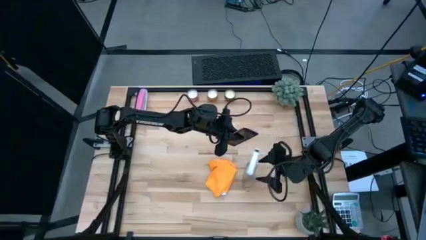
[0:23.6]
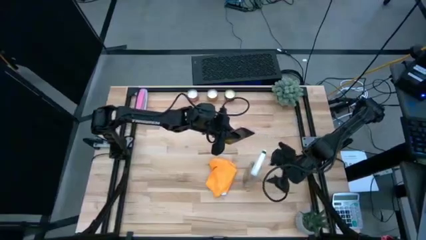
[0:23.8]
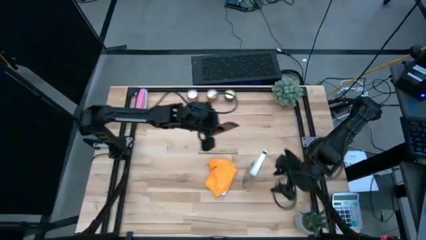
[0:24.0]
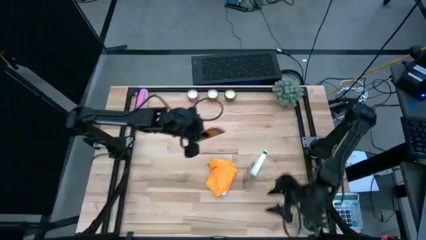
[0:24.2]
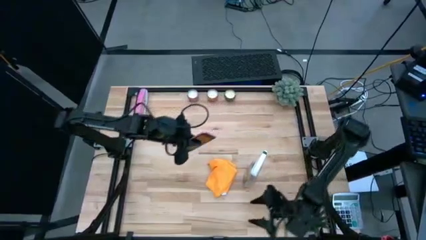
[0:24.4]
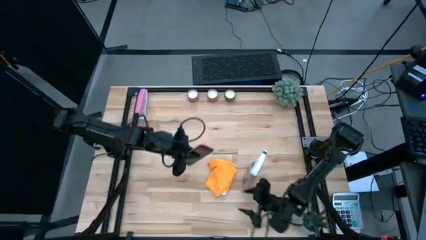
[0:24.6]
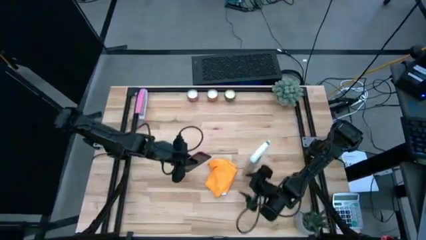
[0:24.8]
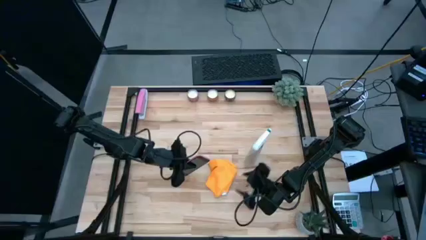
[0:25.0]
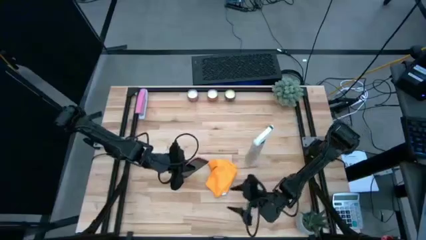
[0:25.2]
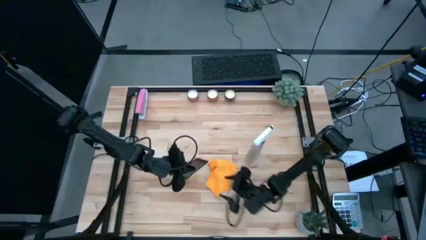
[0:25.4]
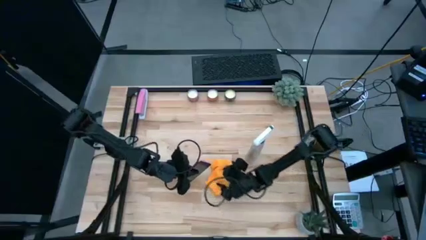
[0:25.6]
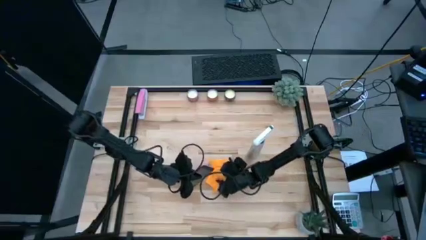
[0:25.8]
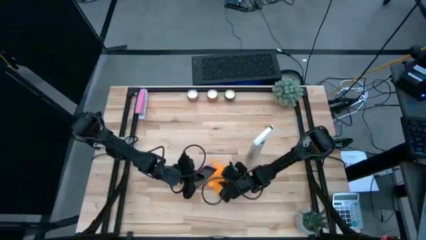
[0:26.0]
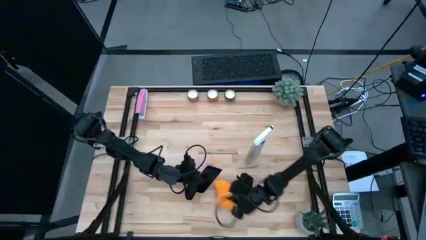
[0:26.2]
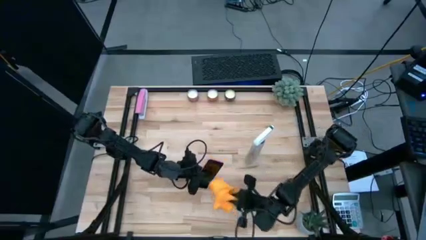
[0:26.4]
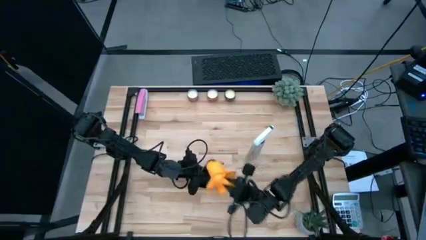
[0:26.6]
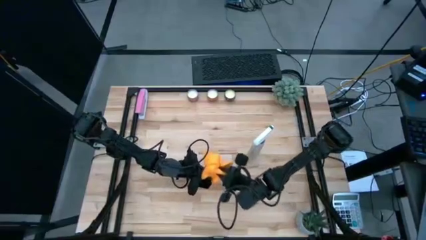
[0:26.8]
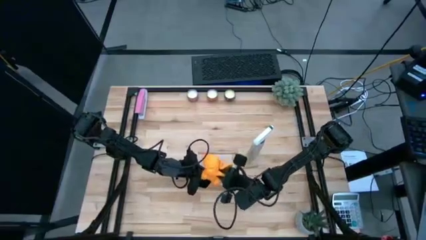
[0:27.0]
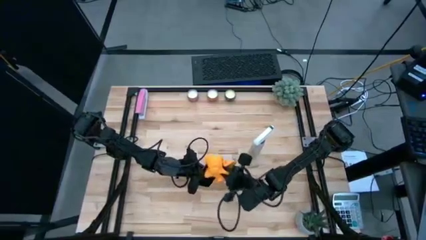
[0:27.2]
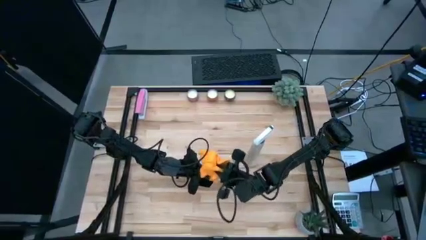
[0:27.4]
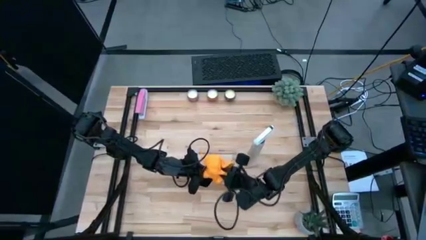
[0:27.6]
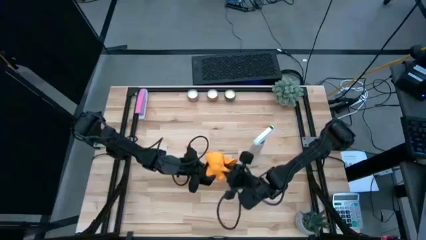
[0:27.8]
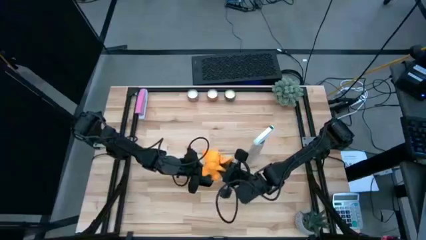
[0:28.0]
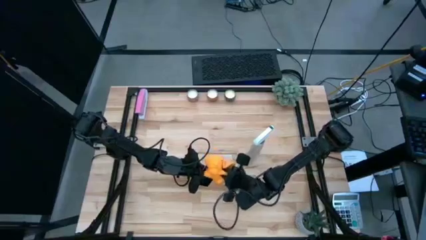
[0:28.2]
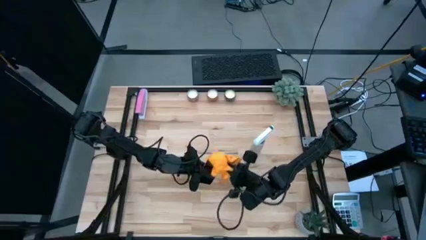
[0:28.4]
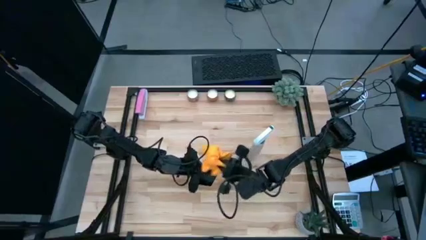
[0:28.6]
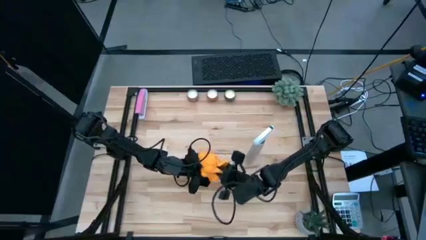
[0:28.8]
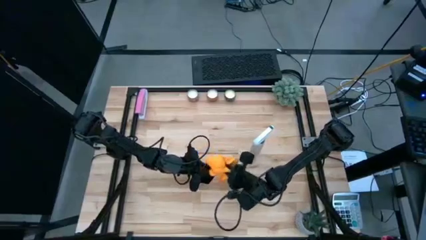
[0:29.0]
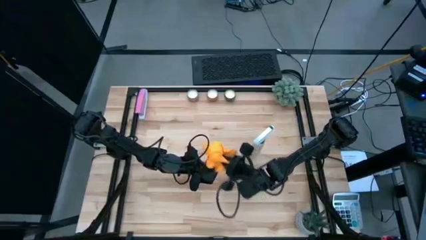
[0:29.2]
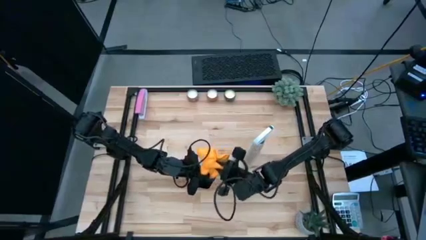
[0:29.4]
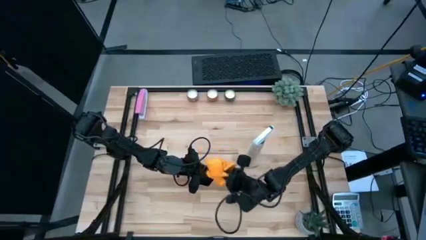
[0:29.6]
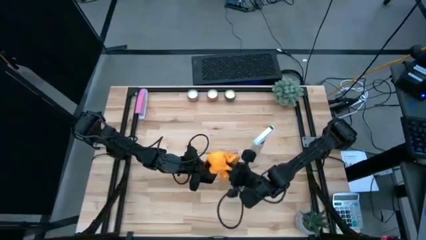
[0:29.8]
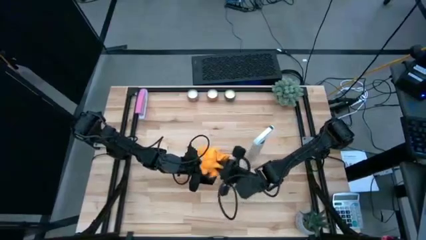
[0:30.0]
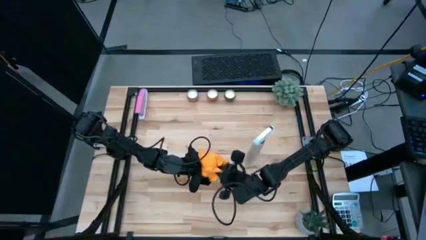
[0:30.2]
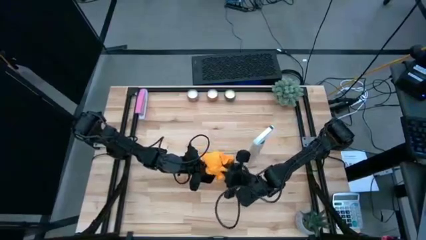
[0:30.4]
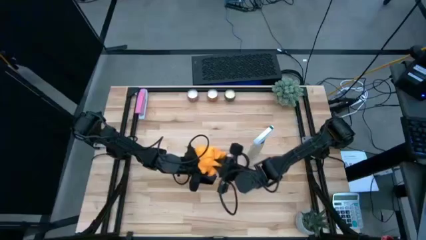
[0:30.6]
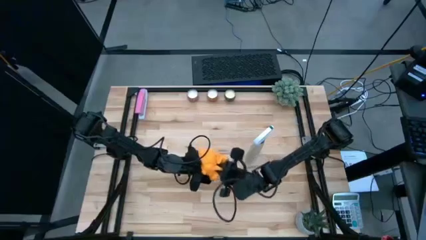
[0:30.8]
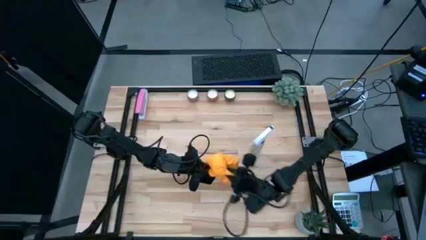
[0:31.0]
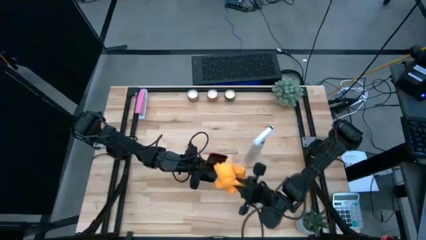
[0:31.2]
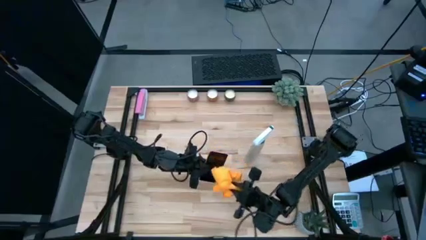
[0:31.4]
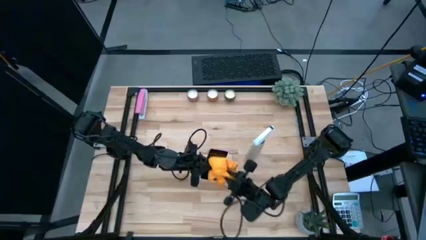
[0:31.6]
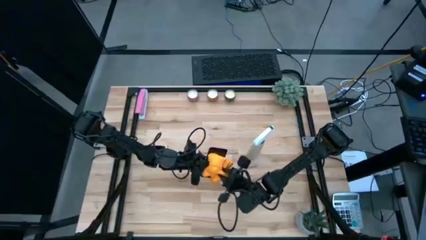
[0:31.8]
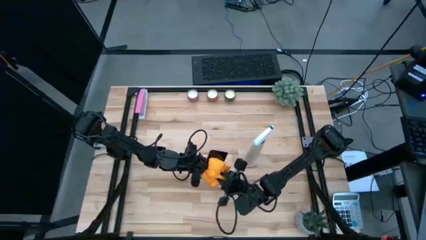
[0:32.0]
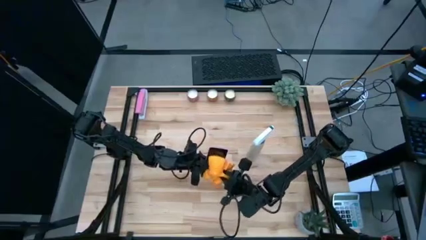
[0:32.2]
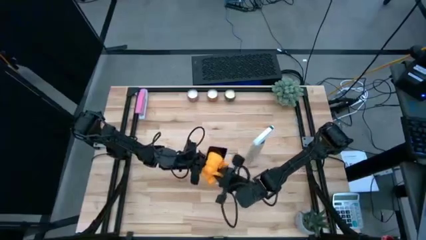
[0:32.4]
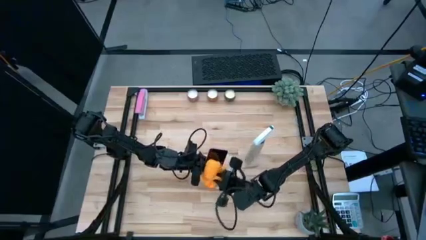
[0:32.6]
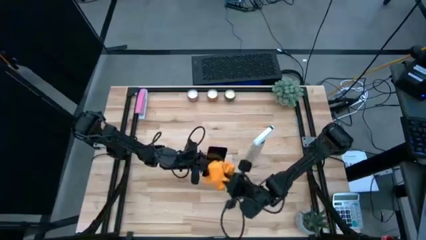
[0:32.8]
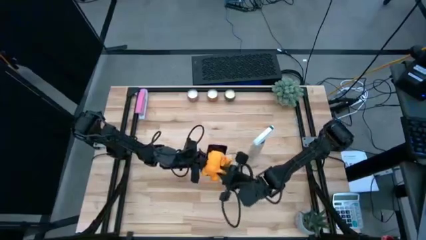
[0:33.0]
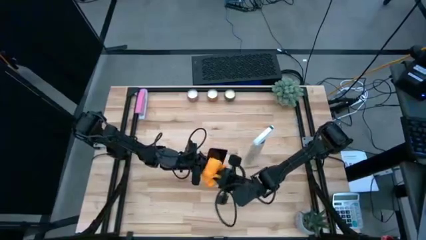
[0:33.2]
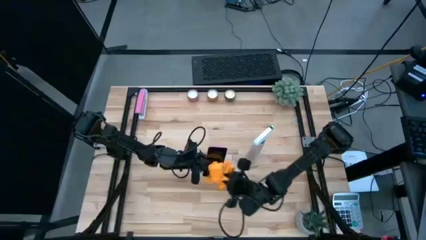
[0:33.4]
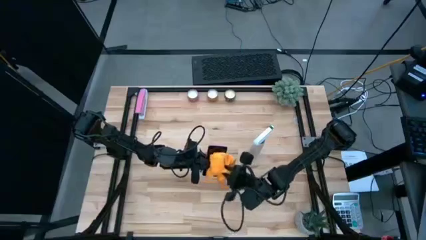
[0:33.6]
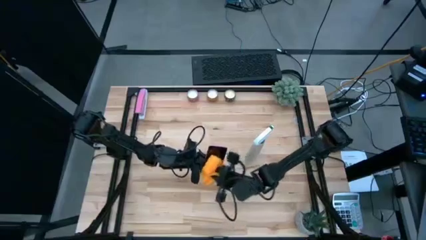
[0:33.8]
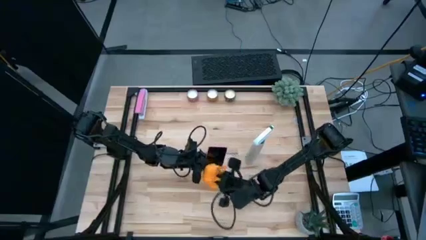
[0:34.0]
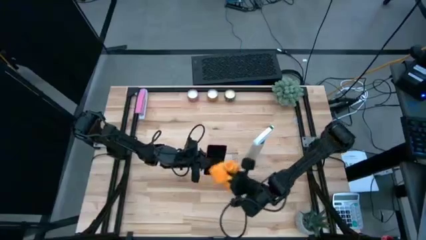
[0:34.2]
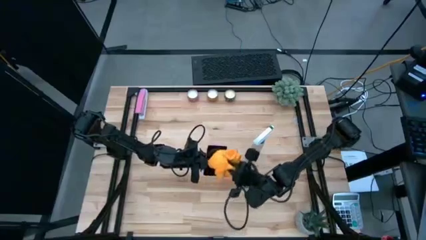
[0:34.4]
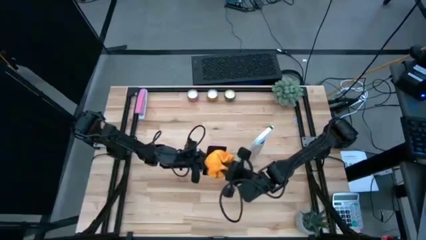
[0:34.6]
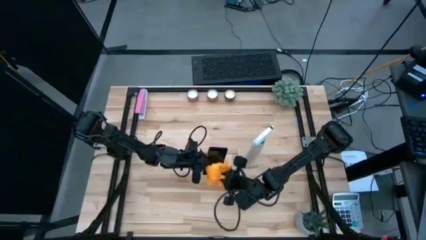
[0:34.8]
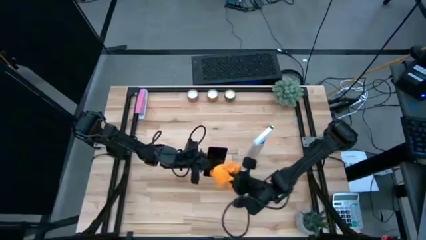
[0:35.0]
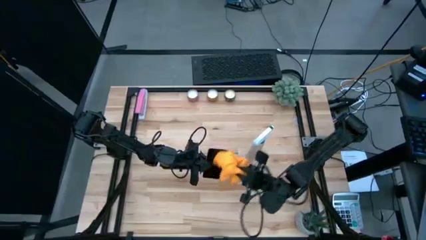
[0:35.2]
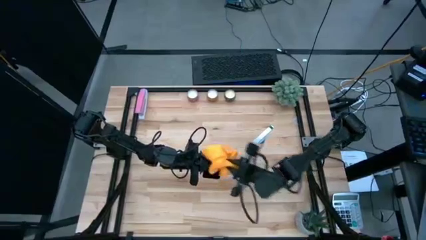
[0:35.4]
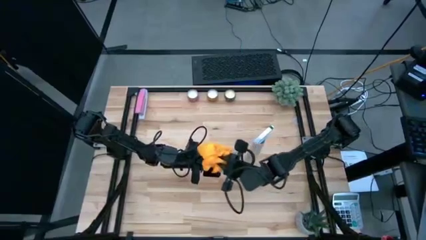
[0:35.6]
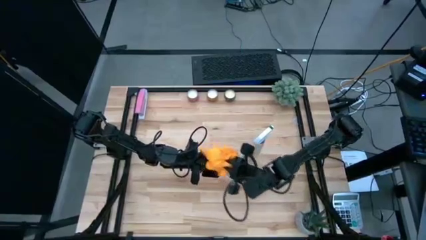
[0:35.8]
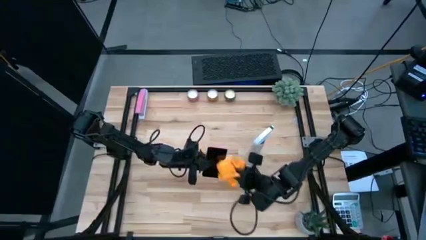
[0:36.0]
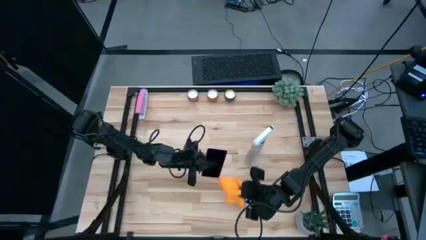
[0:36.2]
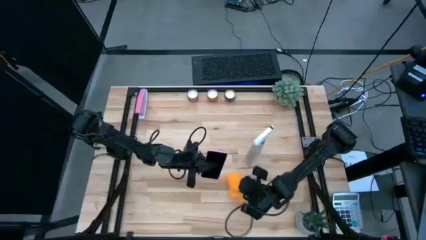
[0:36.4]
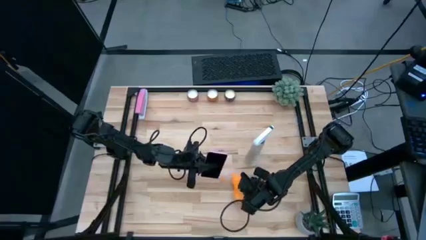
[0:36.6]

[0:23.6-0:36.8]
Task: Apply microfiber cloth
Wipe the front side of the pink cellphone using the orange microfiber cloth
